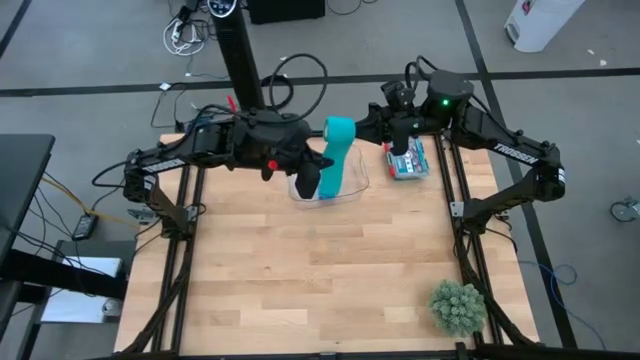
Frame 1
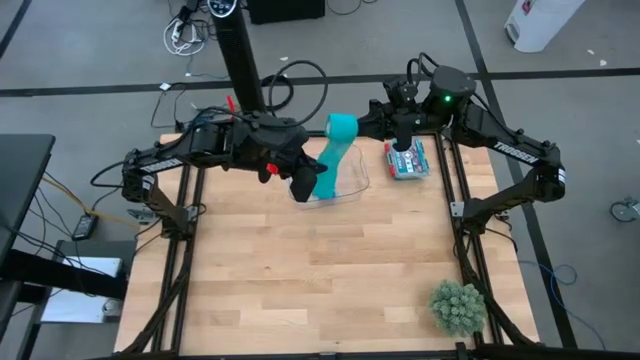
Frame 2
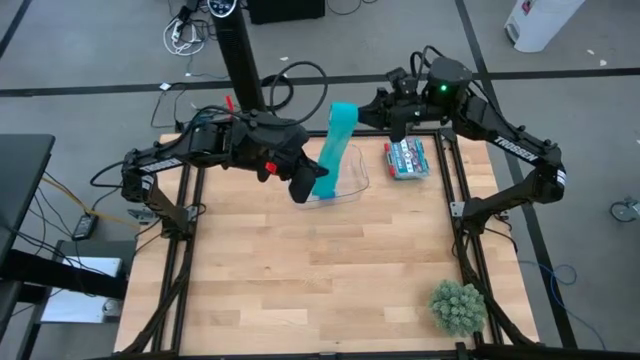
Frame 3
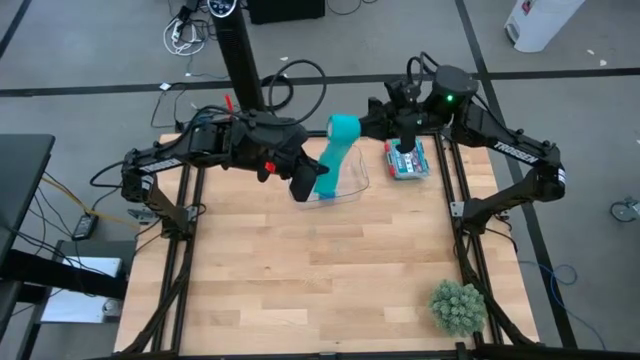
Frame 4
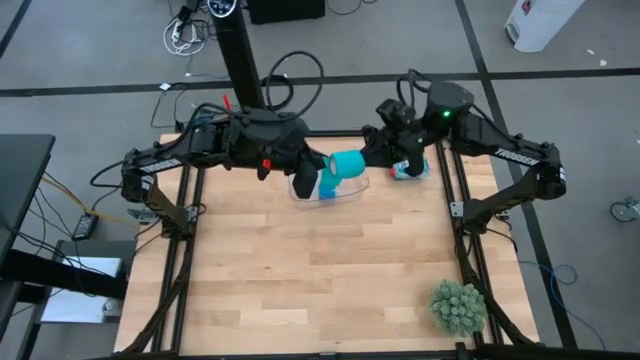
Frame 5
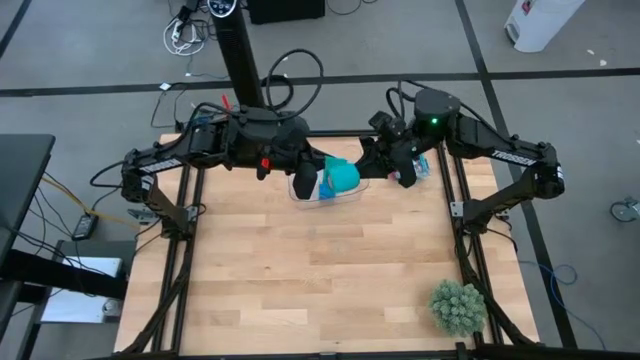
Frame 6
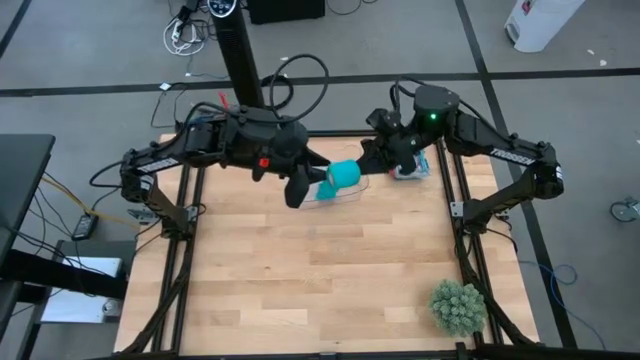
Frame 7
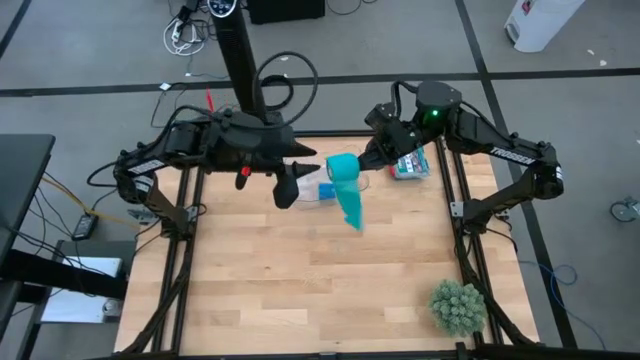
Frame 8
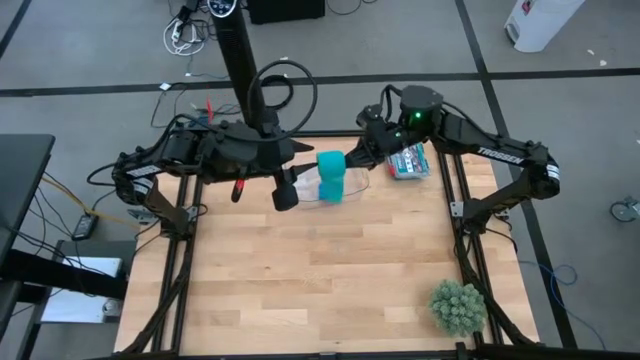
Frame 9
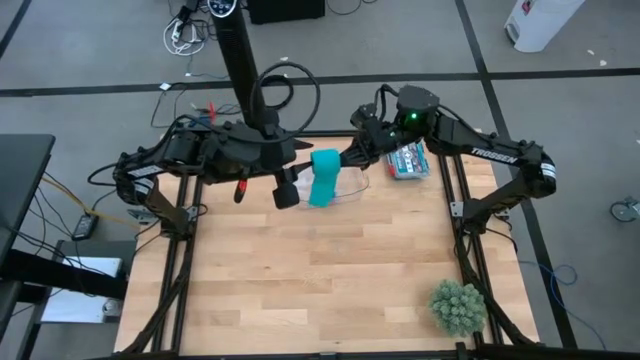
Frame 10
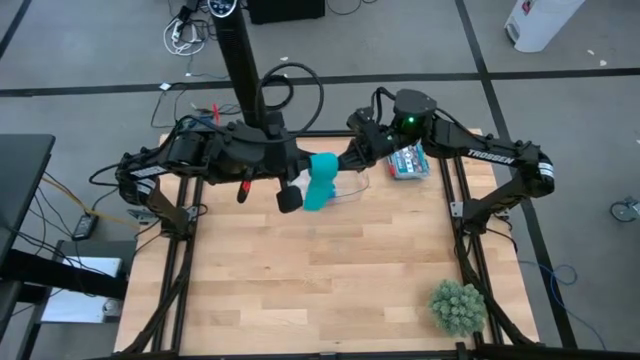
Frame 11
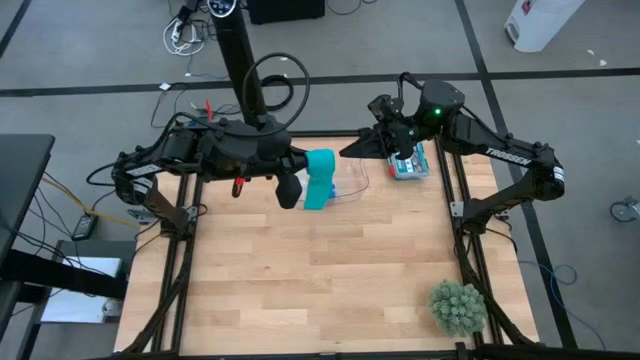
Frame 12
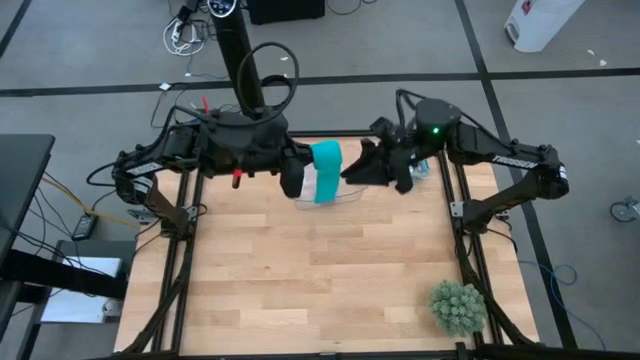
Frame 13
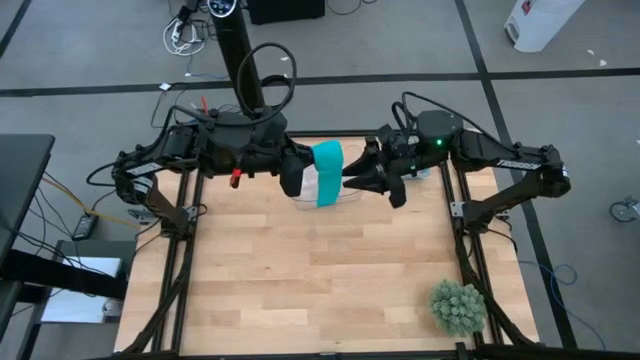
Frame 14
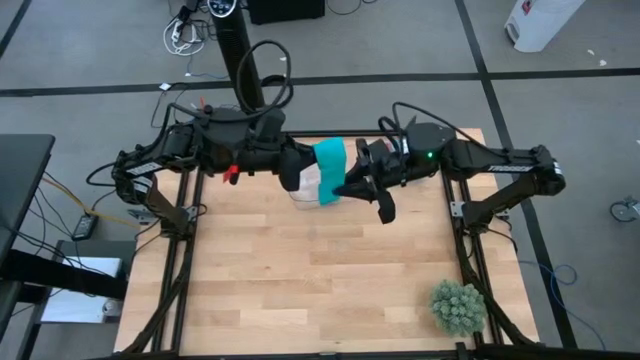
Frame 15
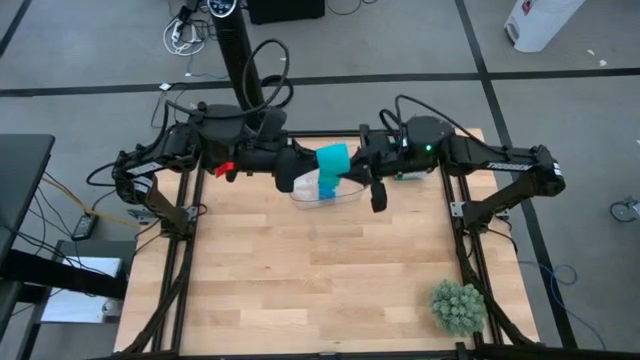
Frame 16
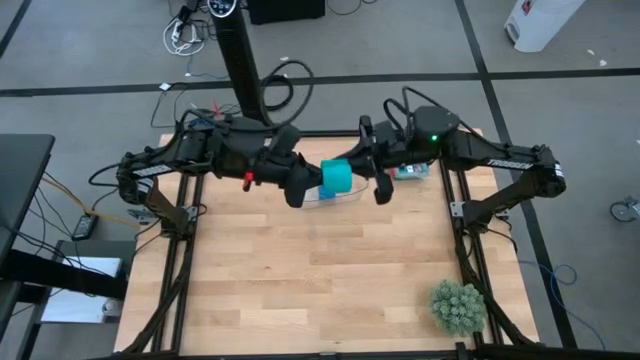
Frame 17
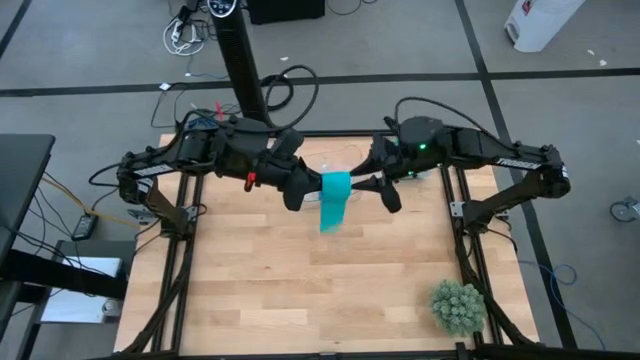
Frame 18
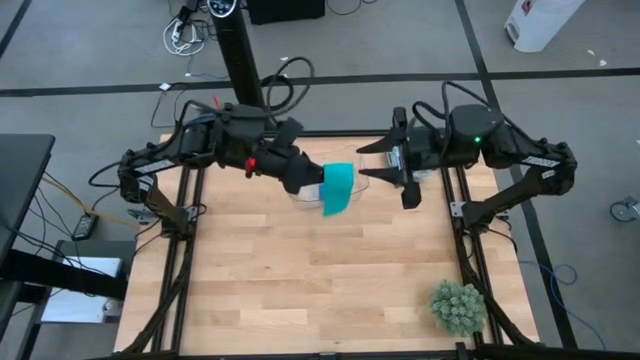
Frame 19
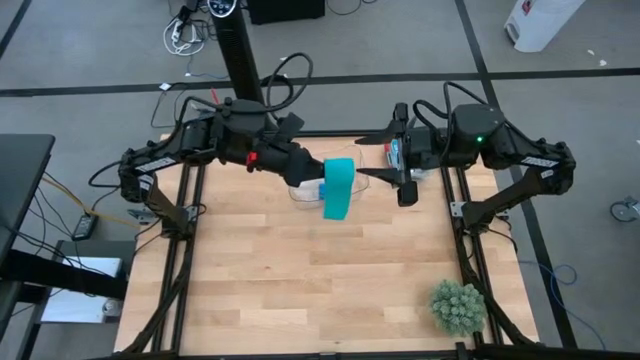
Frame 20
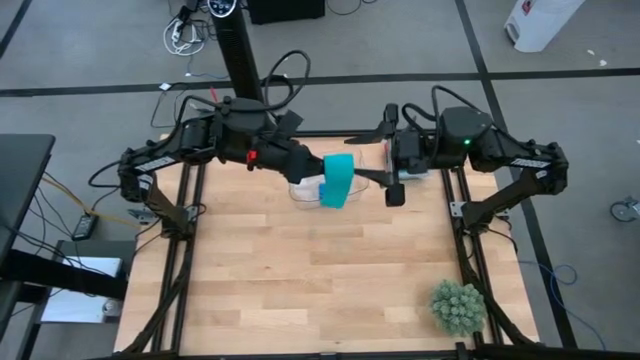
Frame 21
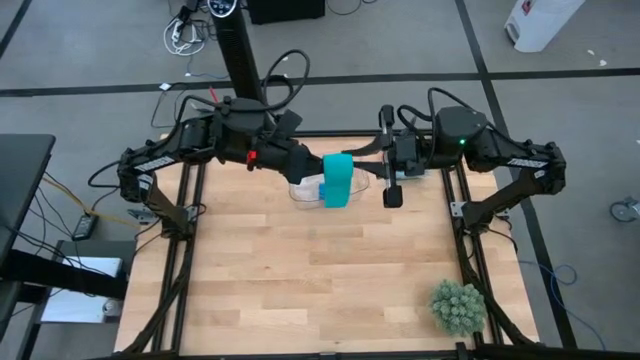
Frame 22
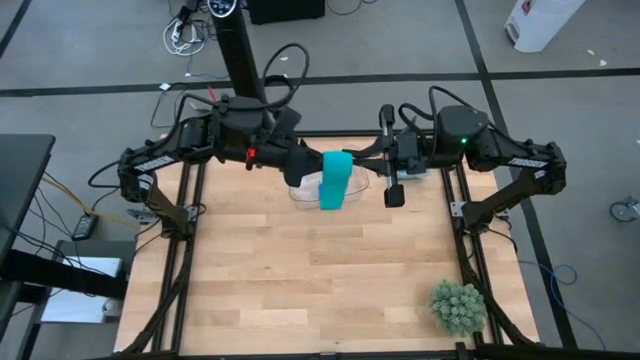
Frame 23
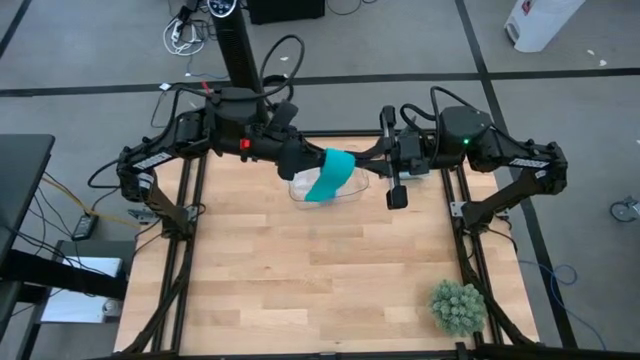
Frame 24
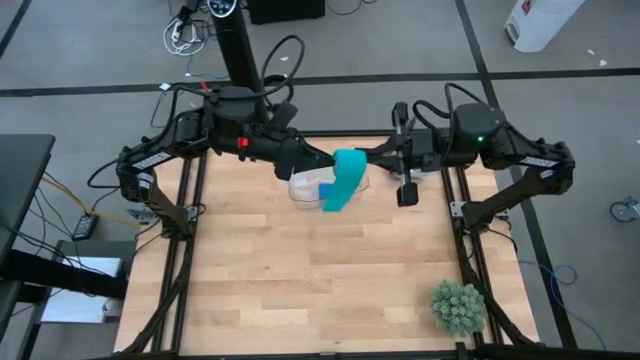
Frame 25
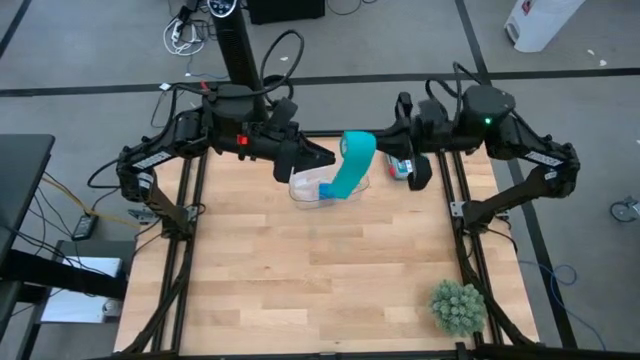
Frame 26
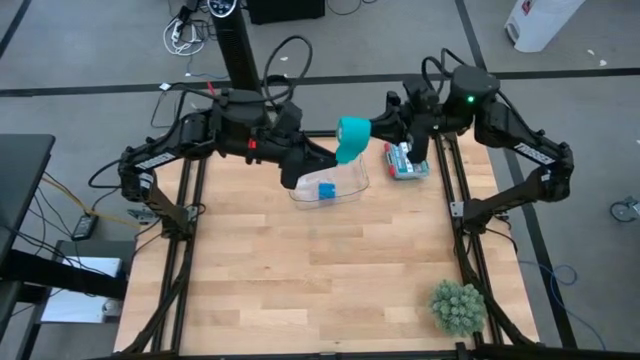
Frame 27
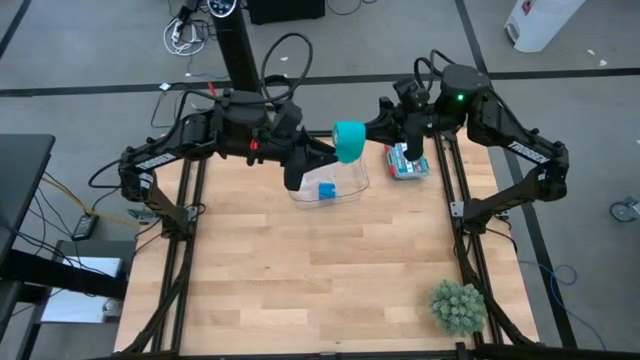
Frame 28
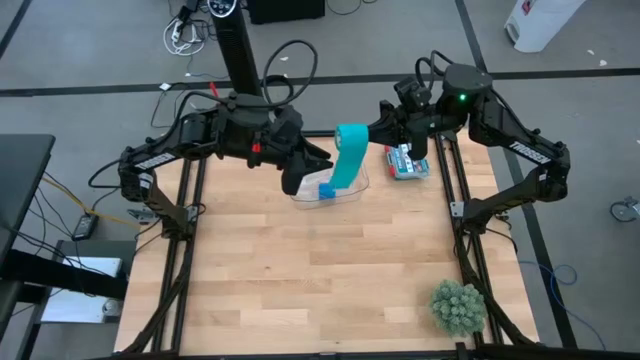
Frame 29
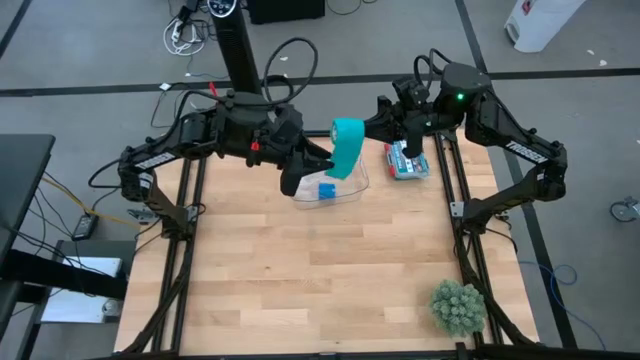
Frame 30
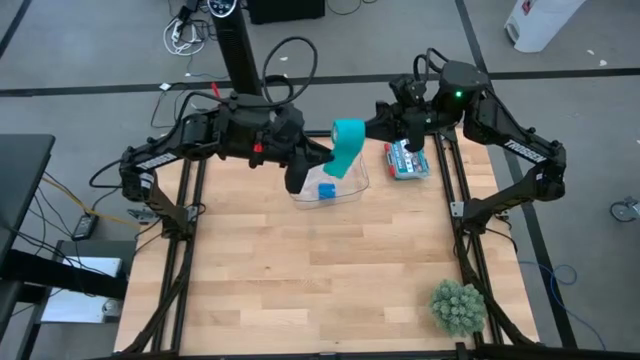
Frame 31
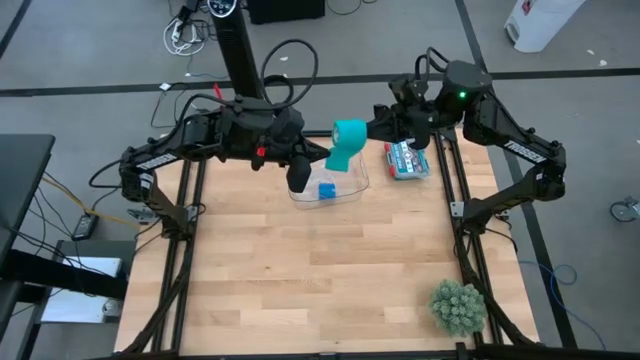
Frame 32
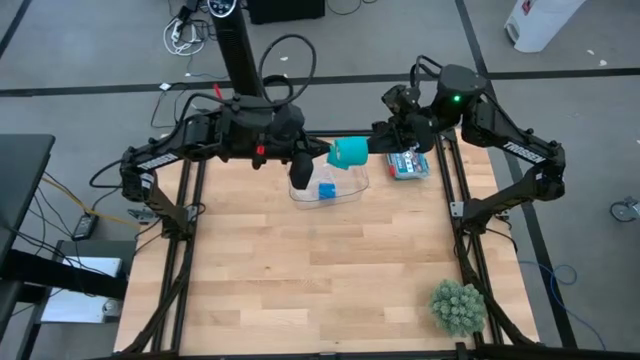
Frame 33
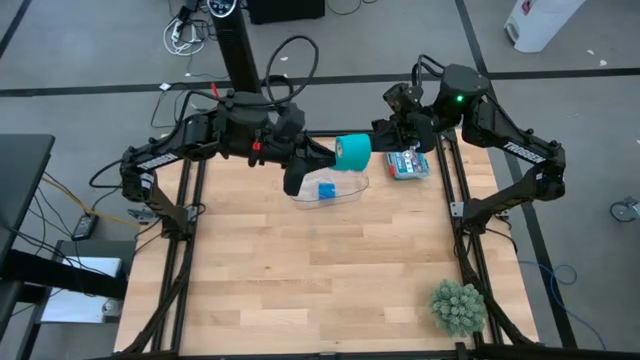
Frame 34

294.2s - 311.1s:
Task: Roll bandage
Roll the sky blue bandage

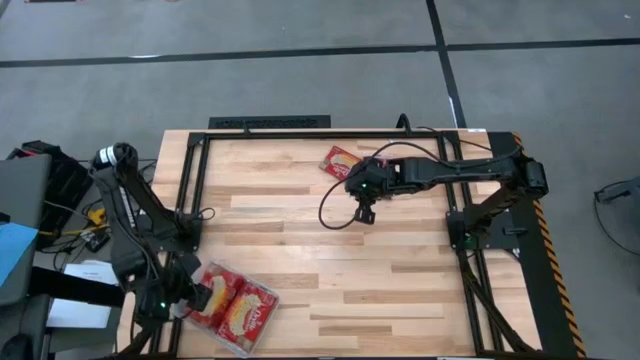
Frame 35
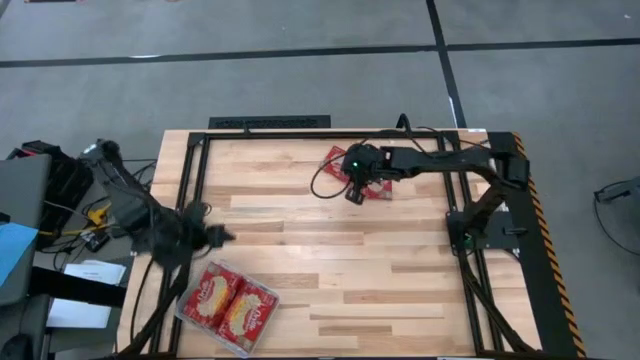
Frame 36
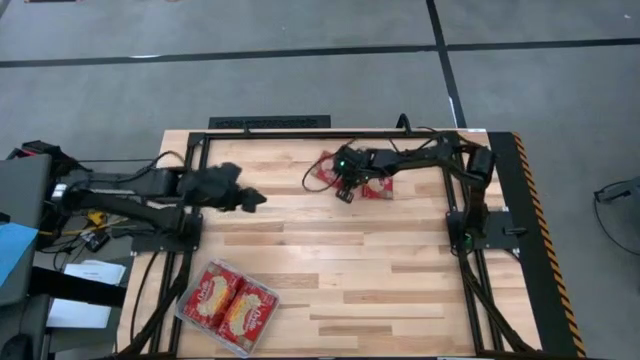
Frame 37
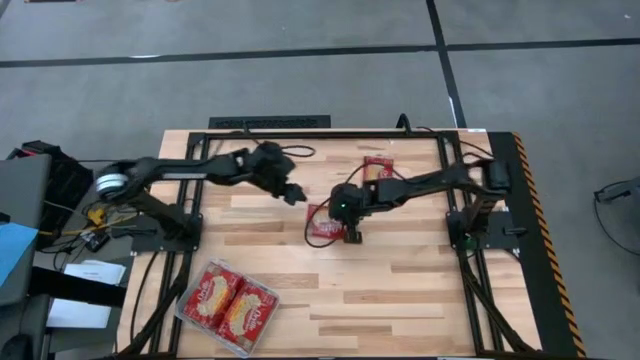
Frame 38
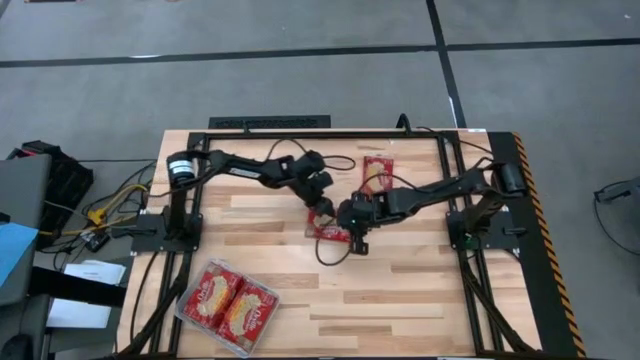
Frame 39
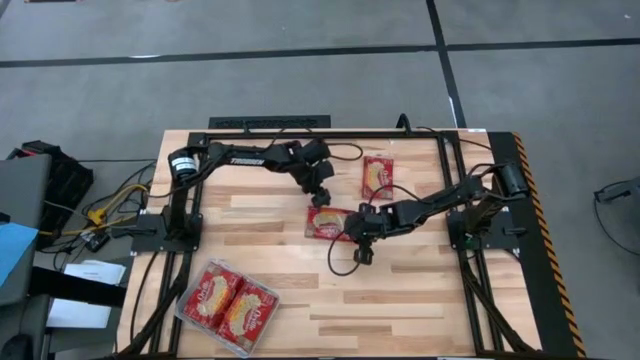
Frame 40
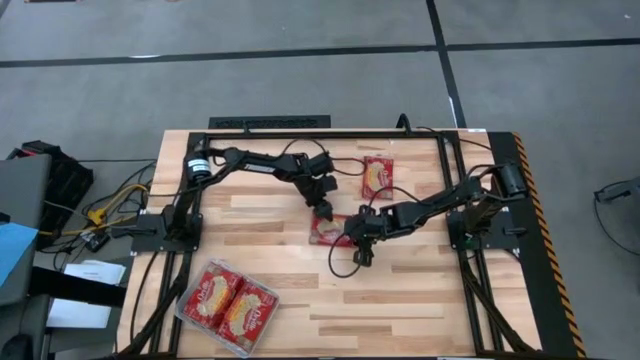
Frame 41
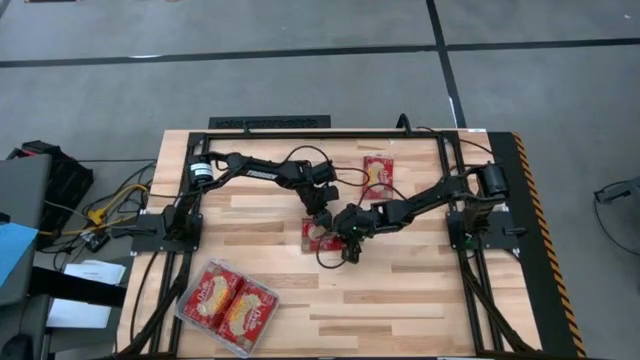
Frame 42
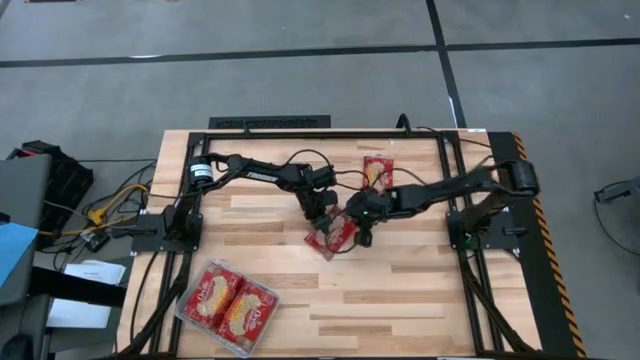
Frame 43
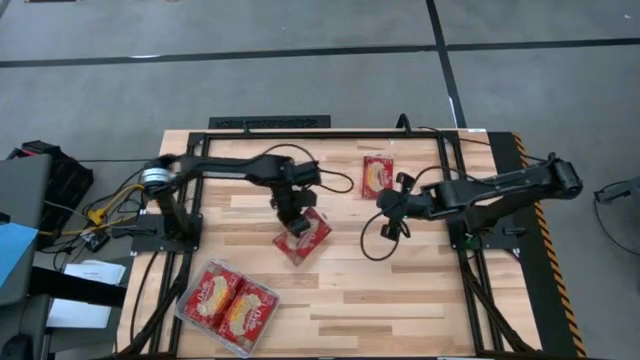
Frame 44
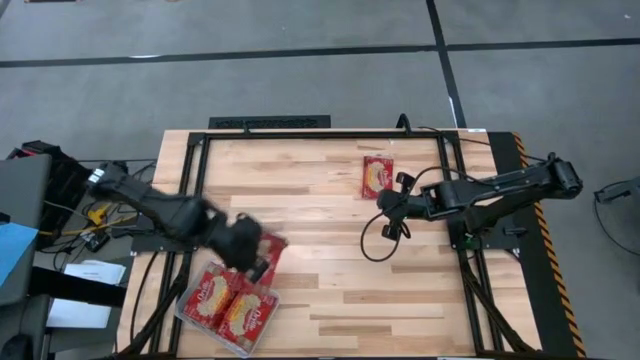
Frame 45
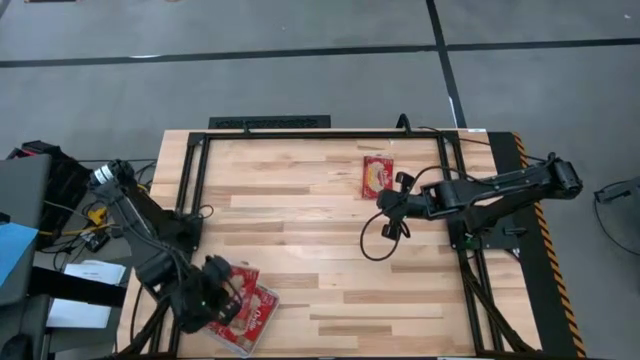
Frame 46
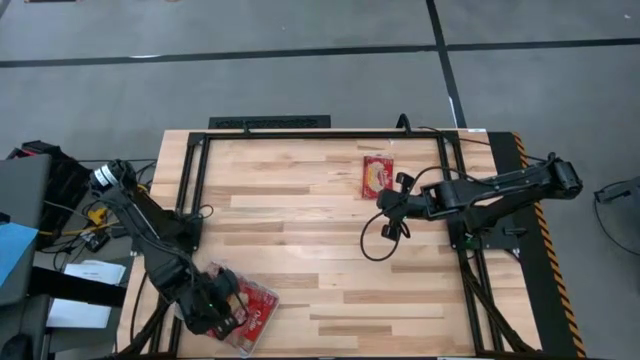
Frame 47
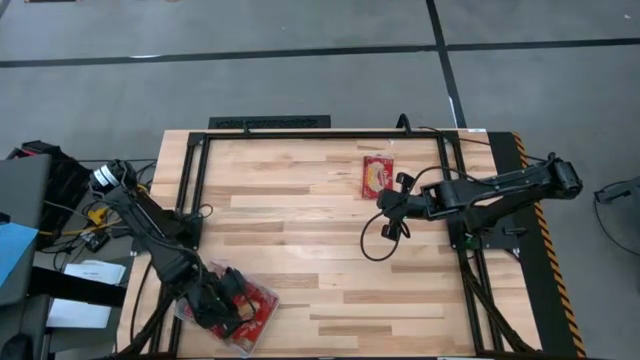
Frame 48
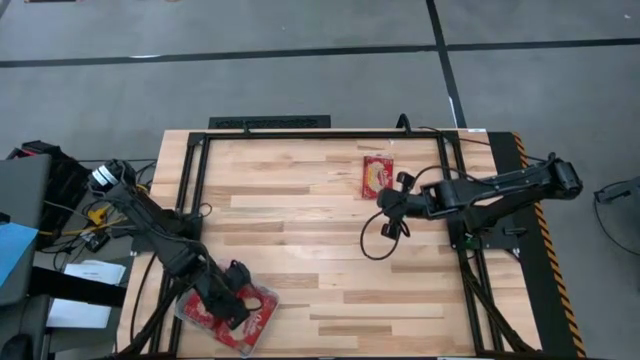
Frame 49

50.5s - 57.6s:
Task: Sort popcorn bags into baskets
Put the red popcorn bag into the transparent bin
